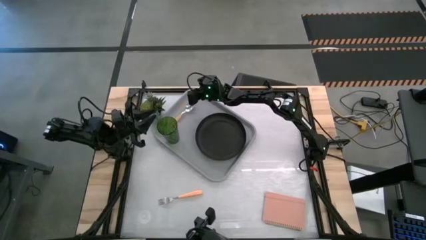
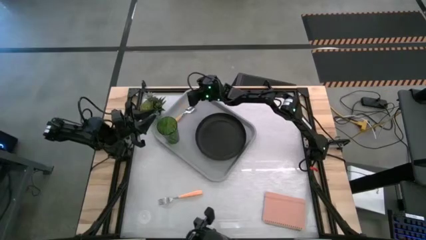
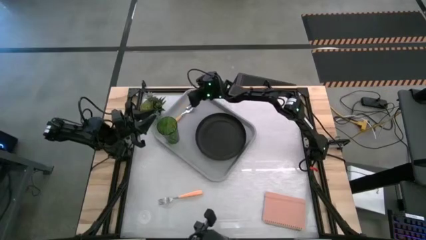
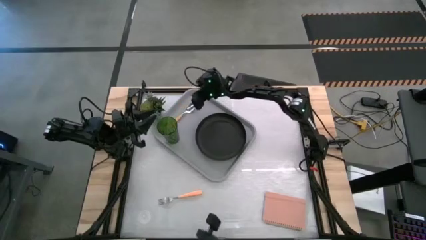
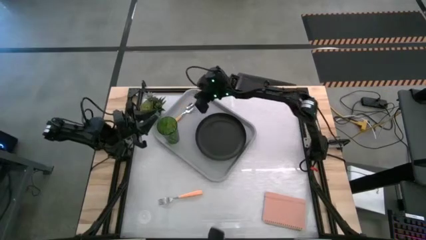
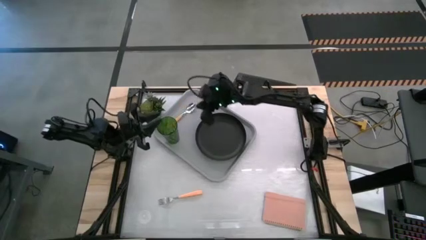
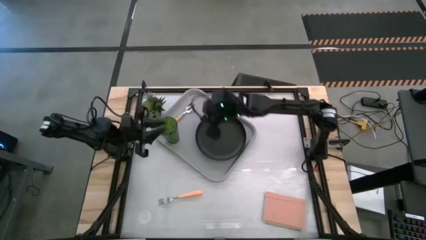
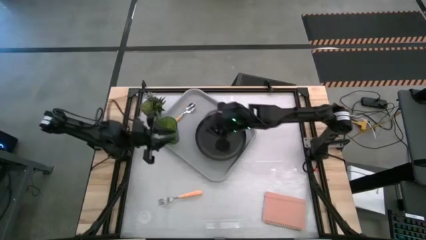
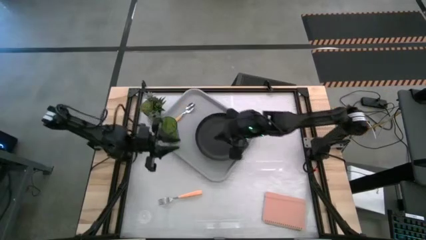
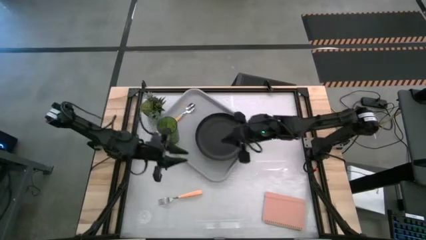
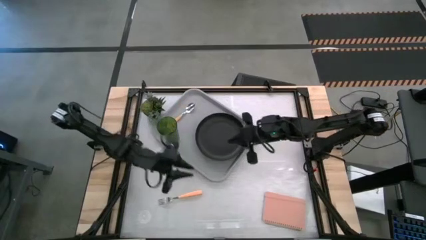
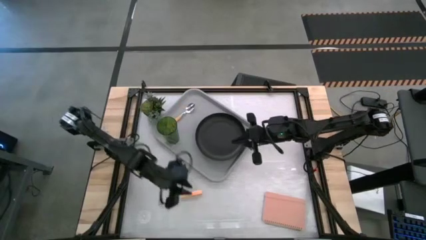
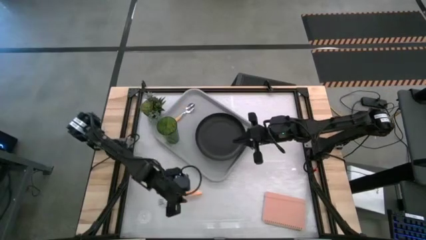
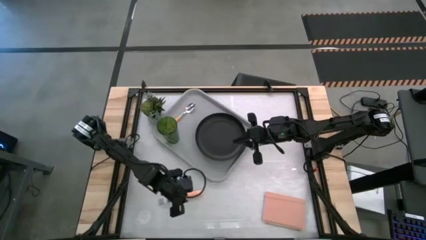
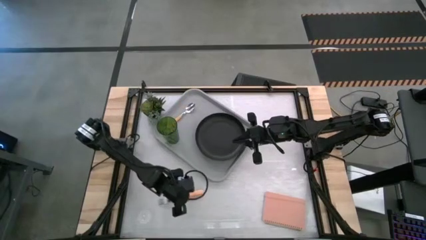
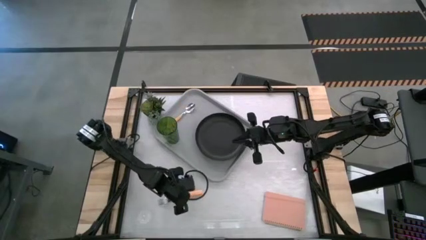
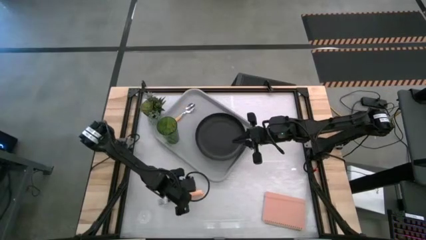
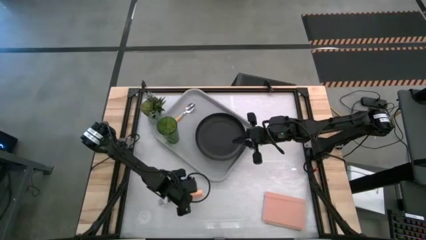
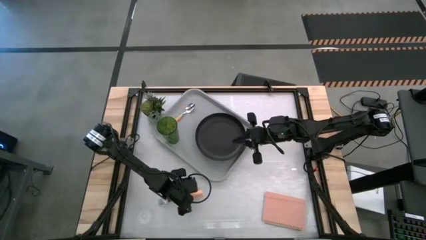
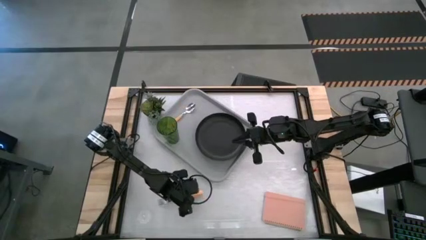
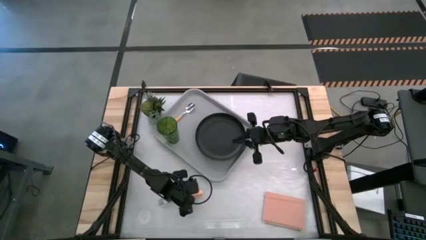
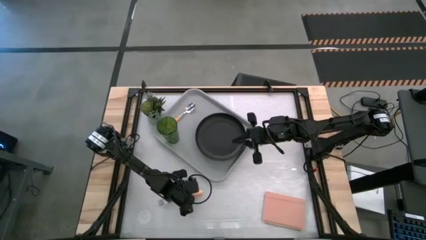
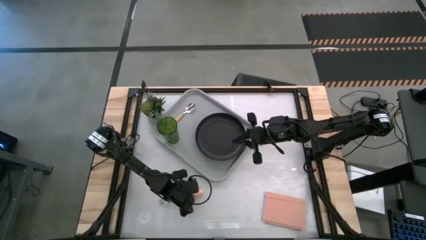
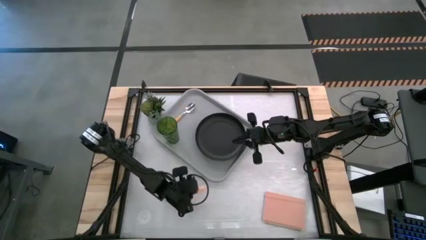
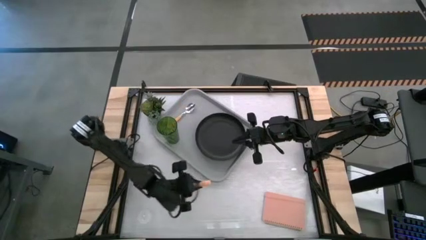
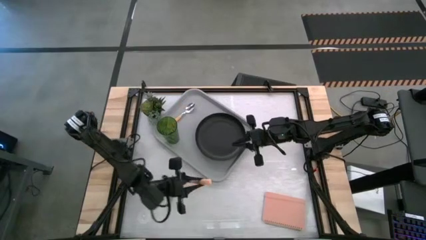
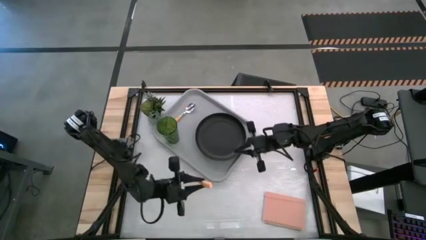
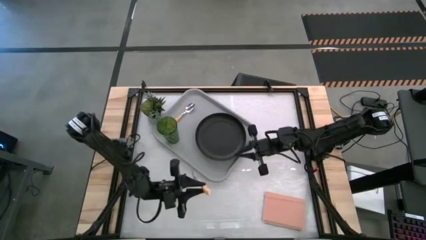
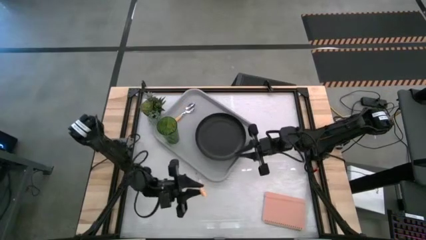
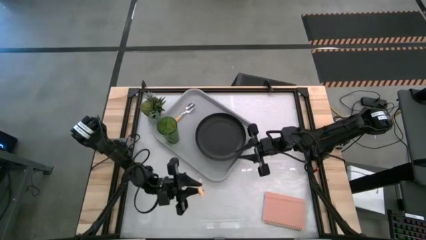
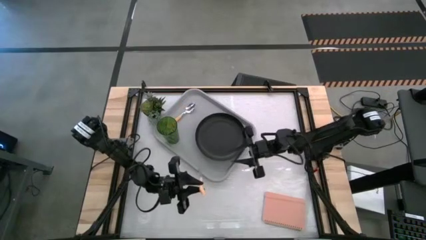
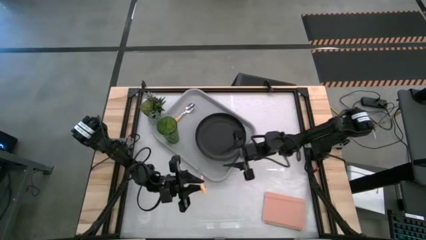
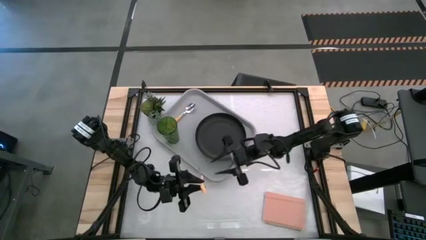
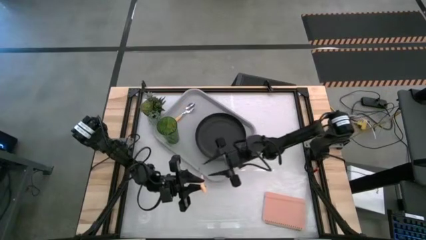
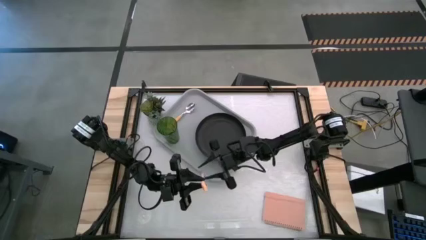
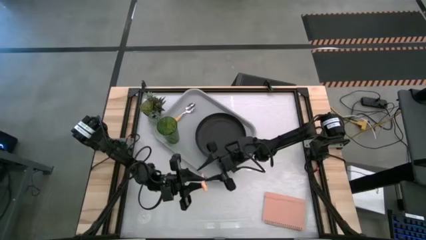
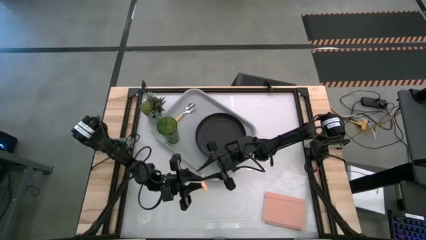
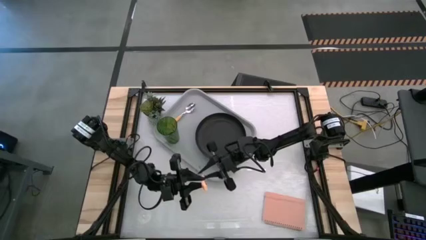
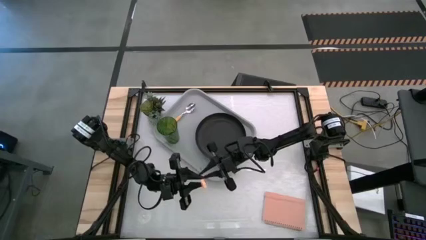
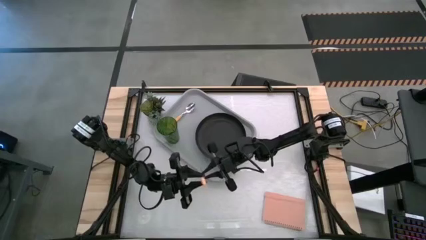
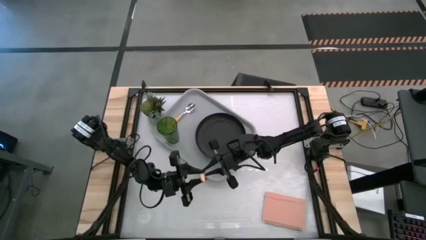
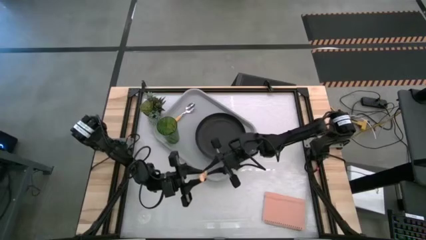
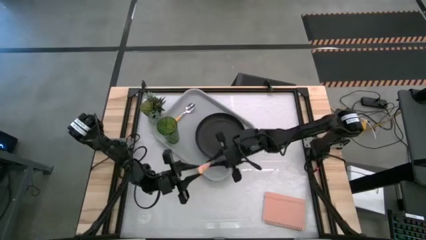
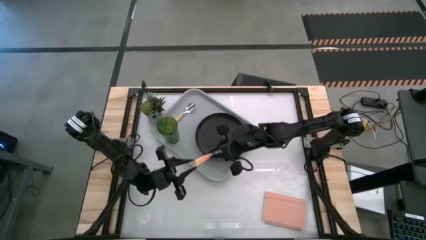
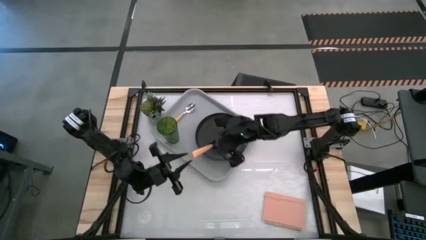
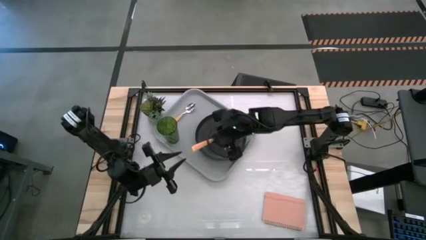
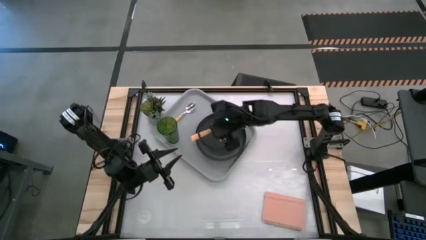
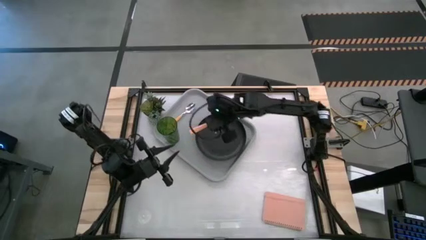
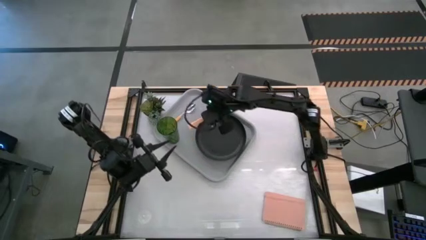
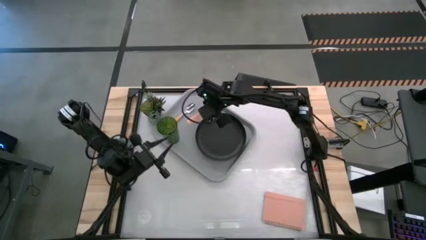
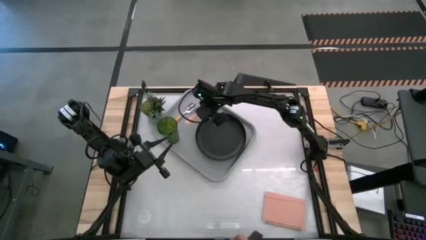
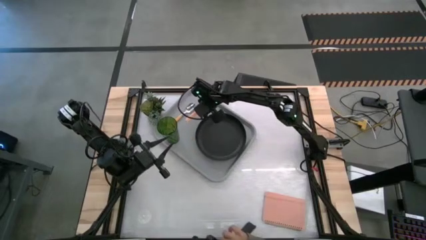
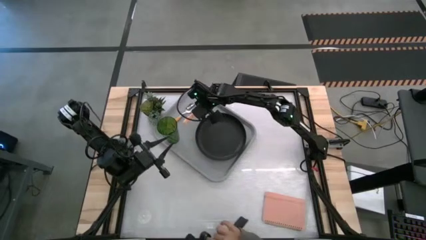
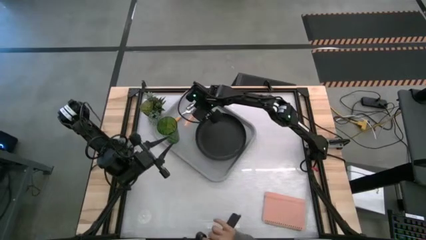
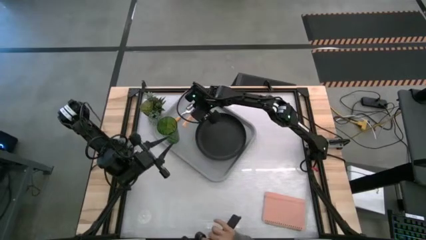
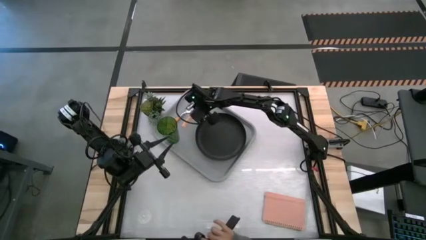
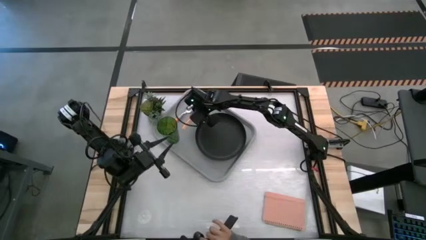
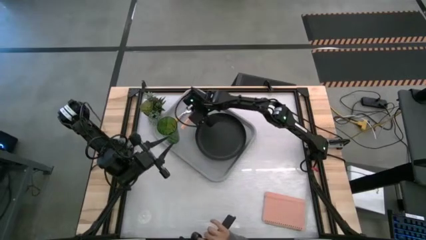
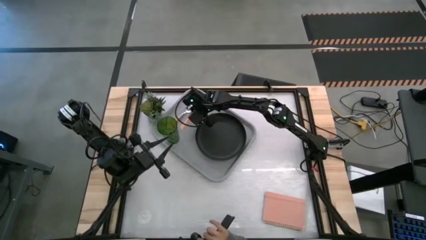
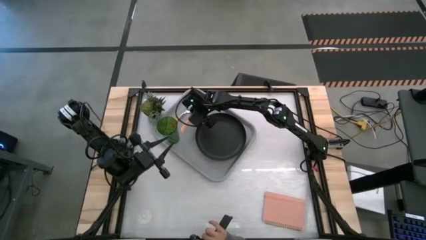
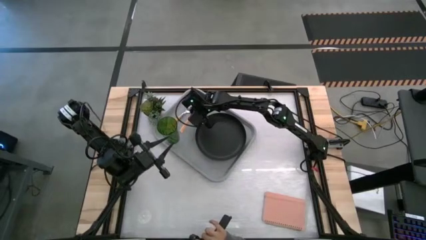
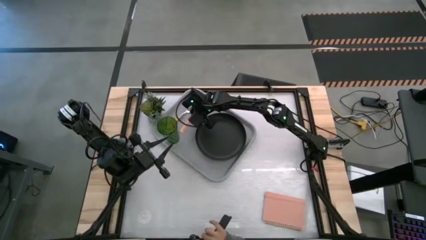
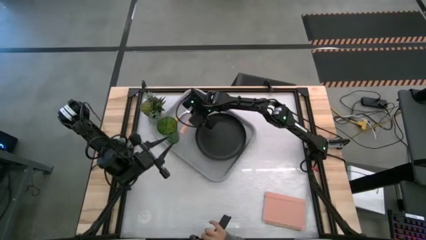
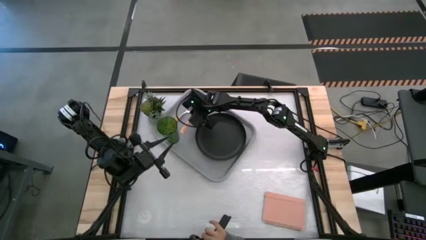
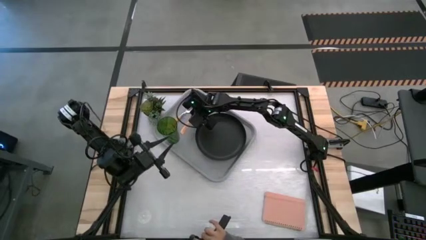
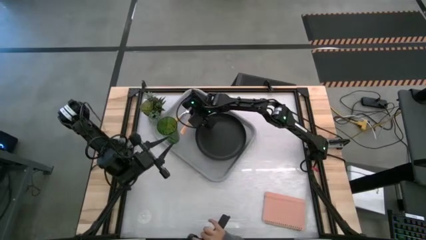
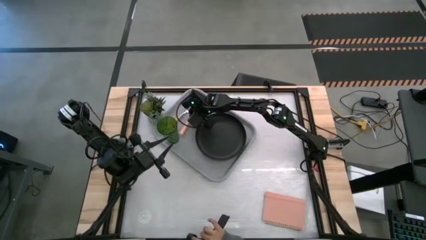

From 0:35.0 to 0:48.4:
Task: Pick and place plate/cup/fork/spoon on tray
Put the orange fork on the gray tray
